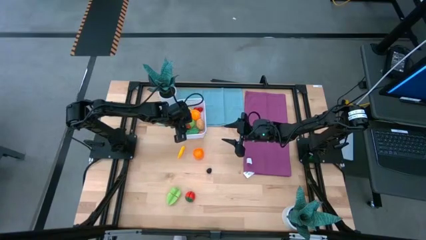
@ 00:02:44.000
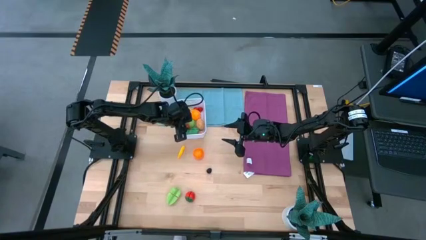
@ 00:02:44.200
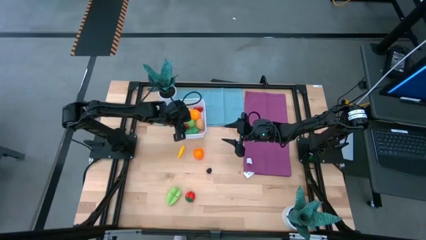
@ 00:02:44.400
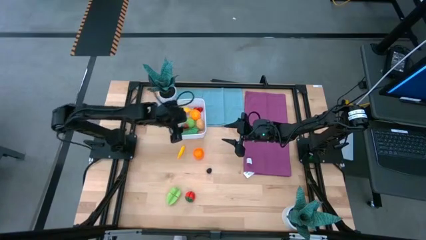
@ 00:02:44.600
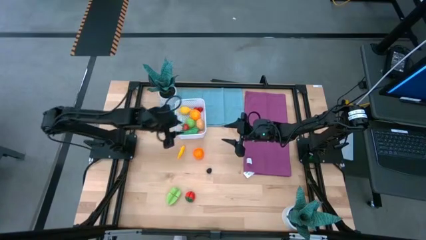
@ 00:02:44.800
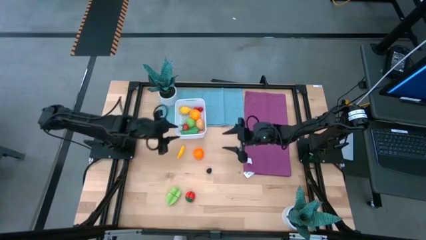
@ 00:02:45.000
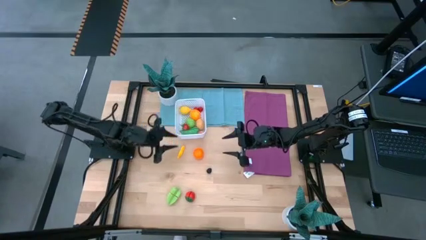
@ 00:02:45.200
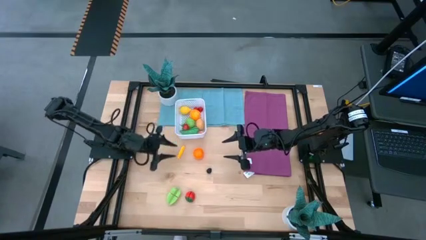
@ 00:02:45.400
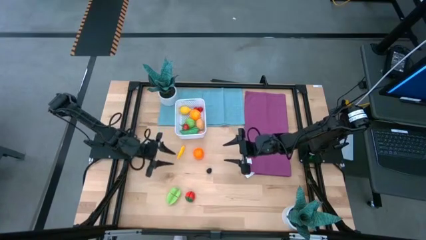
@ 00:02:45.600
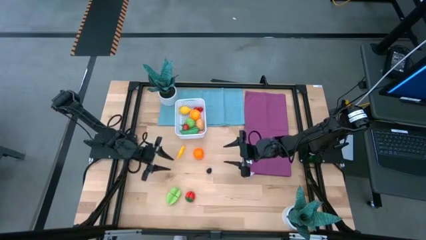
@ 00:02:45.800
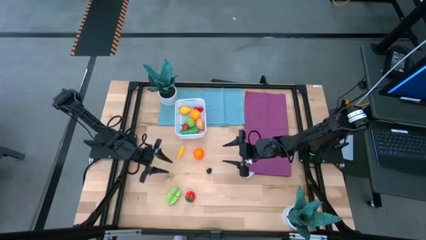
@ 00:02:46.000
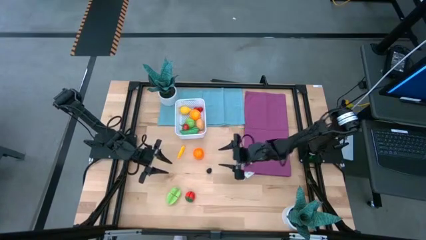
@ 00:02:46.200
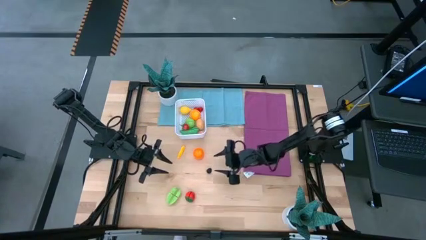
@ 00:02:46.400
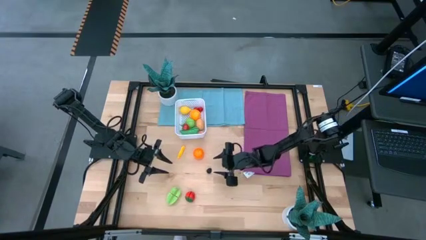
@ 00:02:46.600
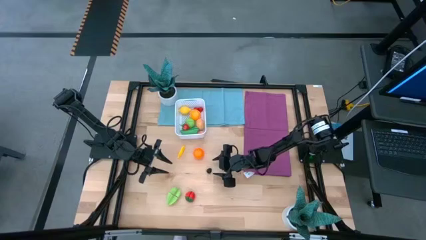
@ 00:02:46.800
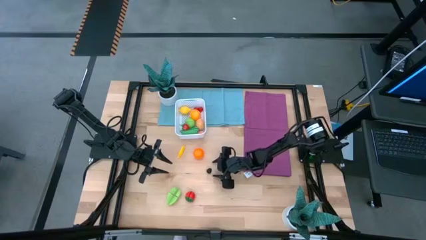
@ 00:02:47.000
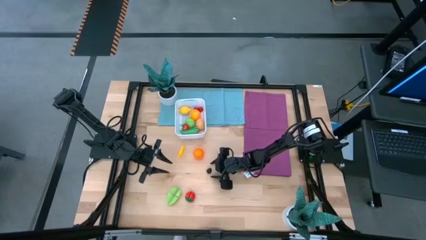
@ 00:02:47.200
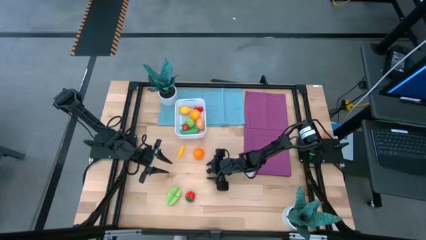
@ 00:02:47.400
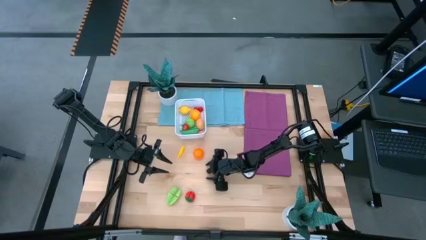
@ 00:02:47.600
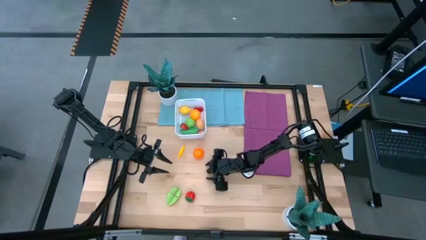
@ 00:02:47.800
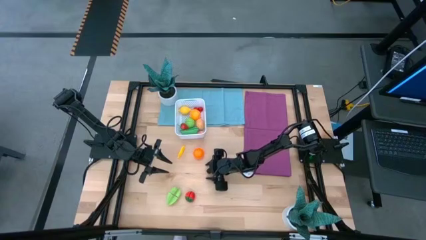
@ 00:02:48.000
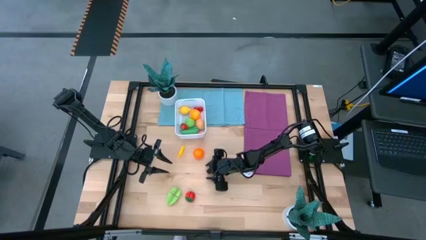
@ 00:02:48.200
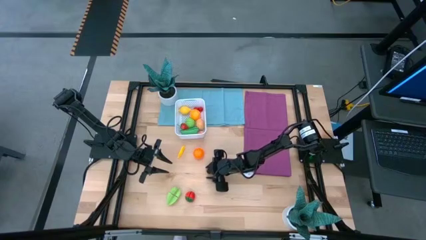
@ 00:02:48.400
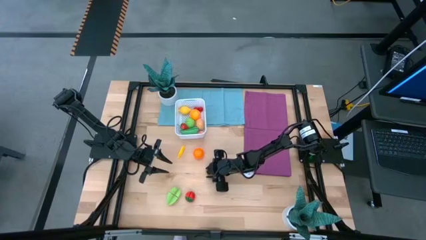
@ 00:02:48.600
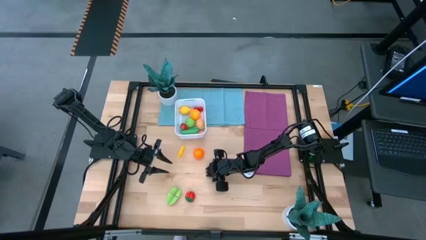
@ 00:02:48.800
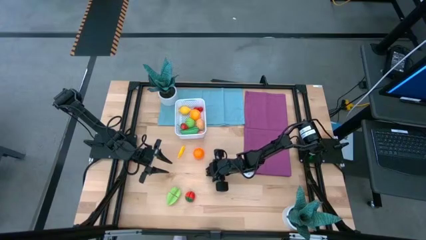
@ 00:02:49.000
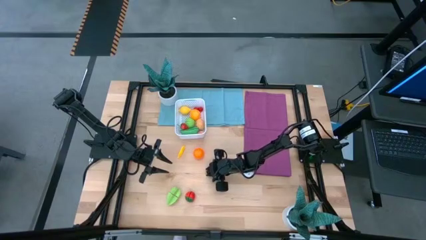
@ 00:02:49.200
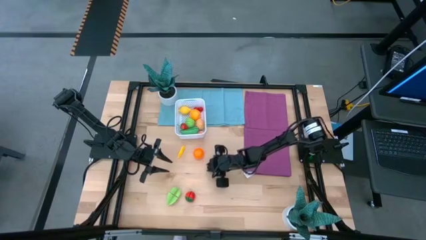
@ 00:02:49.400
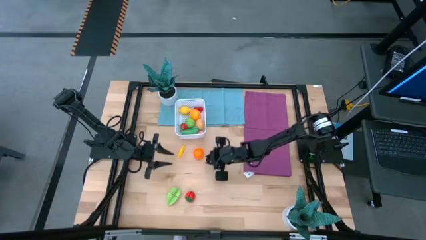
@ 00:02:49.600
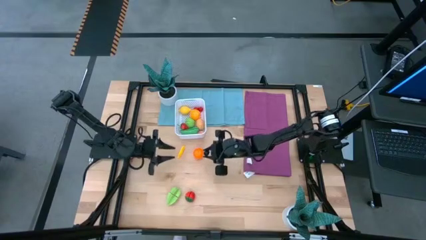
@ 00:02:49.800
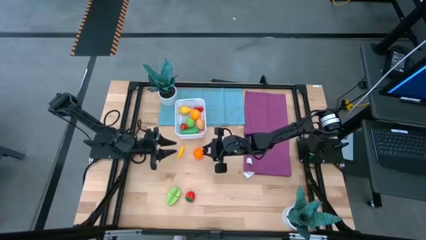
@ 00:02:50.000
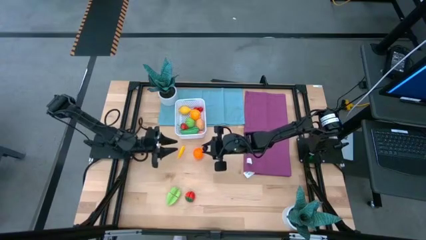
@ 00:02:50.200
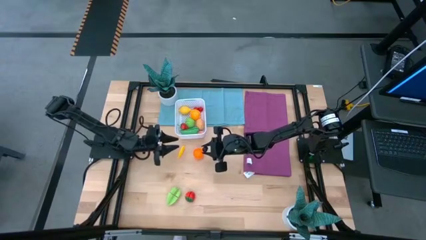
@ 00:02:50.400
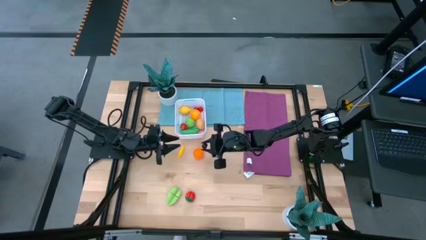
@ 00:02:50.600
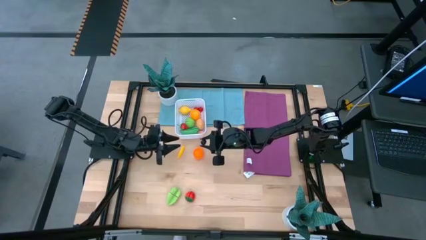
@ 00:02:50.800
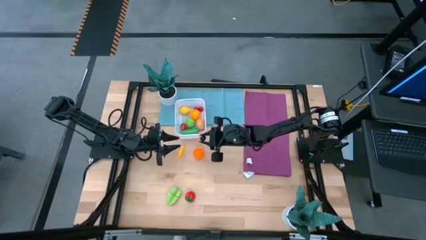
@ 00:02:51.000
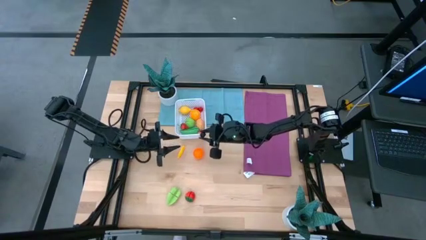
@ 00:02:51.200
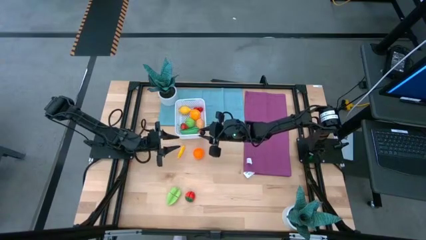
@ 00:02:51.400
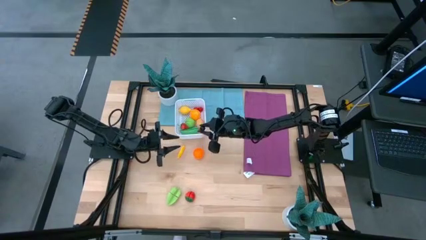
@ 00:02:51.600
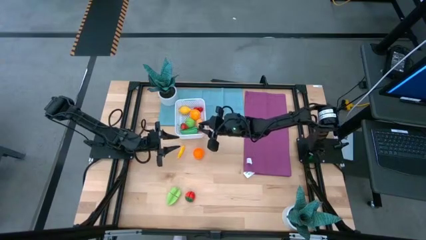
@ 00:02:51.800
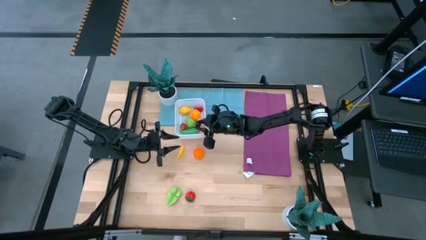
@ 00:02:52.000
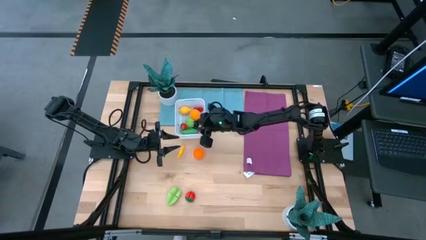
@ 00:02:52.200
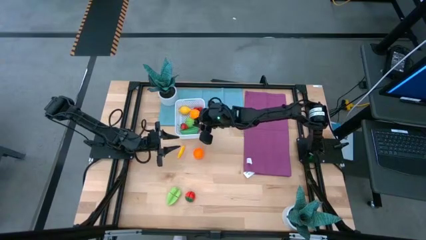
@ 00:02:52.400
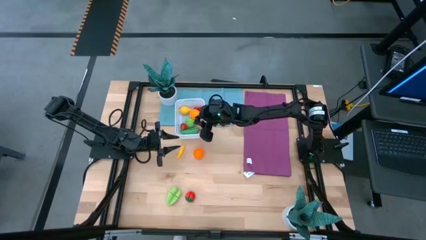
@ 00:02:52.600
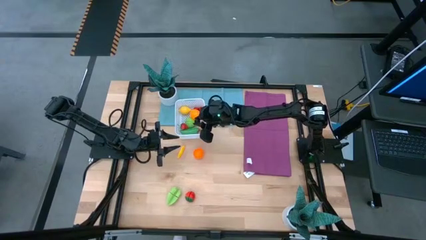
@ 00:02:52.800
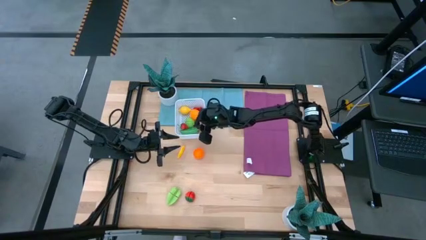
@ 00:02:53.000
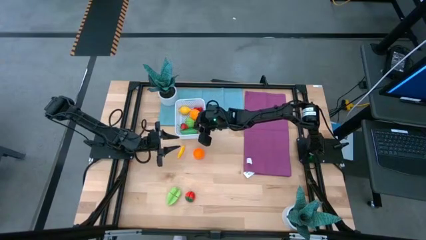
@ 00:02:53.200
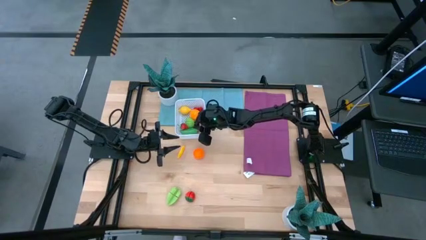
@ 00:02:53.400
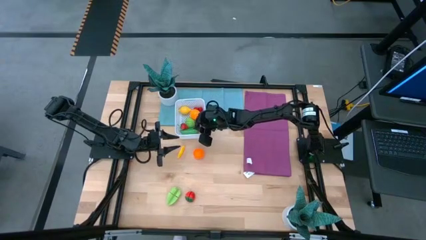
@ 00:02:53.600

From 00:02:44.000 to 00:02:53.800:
Task: Pick and placing Produce into tupperware
Put the blackberry into the white basket

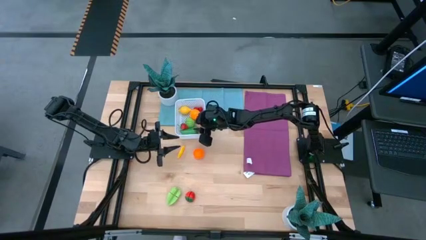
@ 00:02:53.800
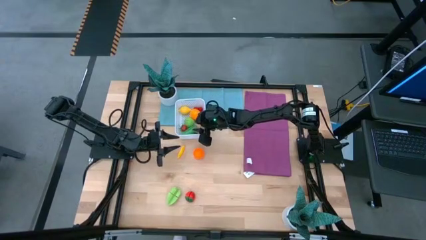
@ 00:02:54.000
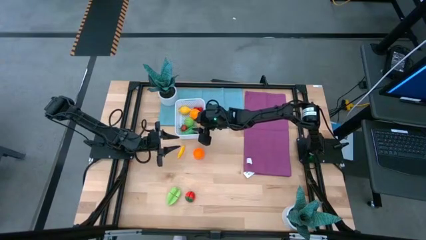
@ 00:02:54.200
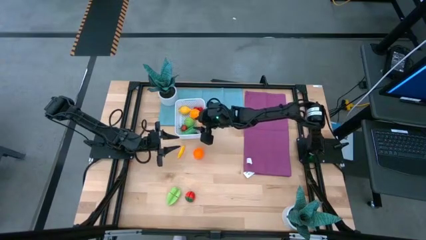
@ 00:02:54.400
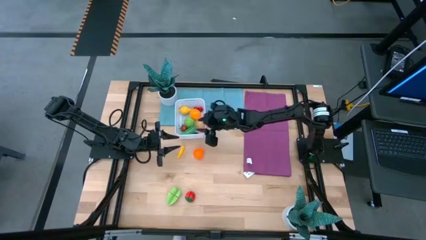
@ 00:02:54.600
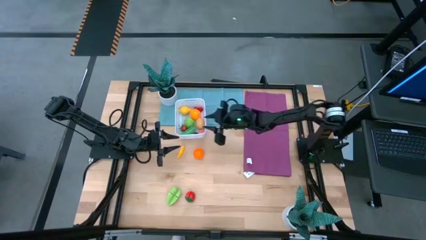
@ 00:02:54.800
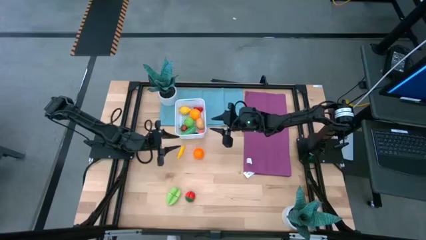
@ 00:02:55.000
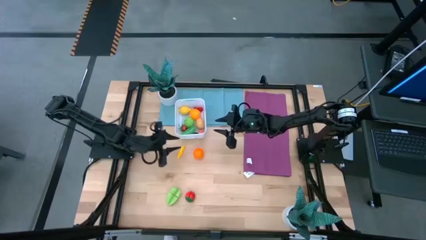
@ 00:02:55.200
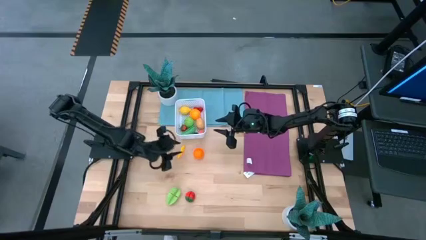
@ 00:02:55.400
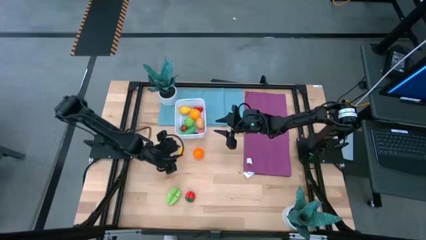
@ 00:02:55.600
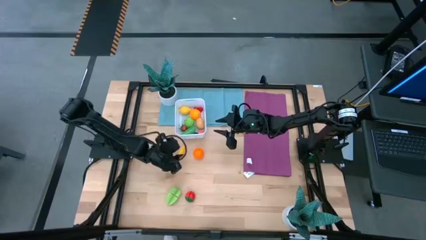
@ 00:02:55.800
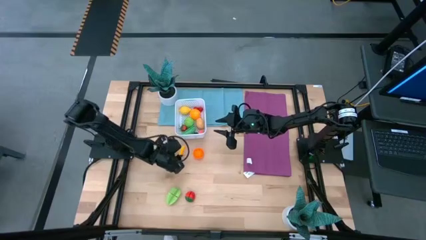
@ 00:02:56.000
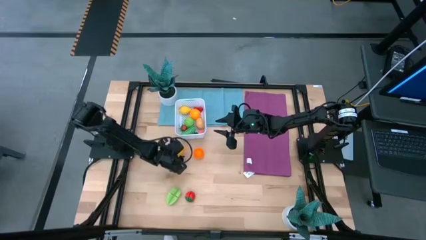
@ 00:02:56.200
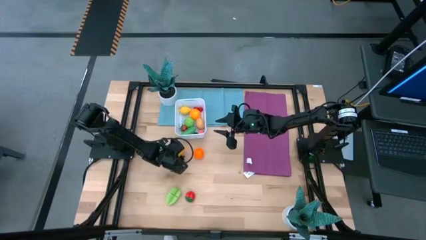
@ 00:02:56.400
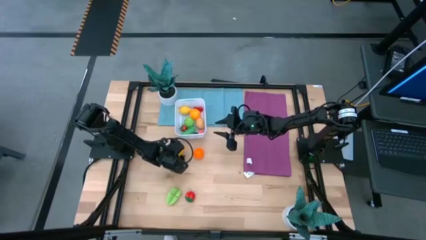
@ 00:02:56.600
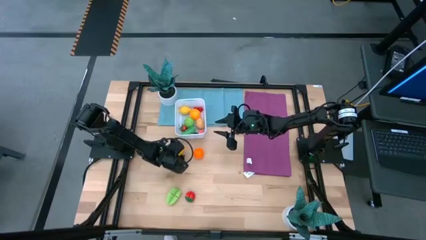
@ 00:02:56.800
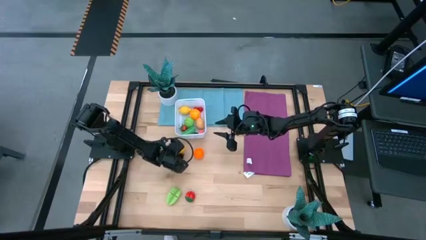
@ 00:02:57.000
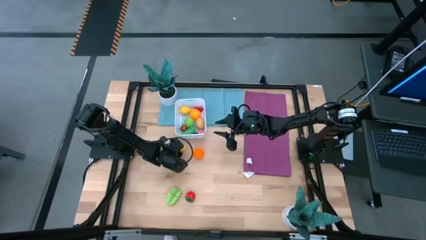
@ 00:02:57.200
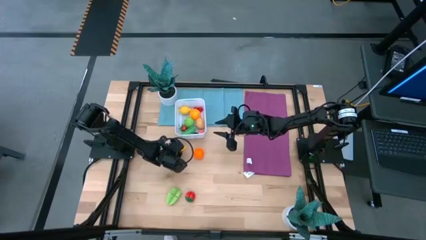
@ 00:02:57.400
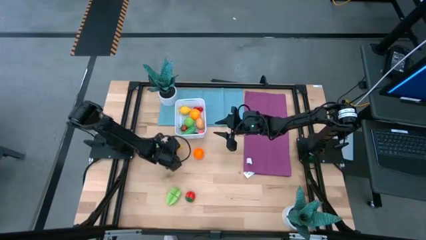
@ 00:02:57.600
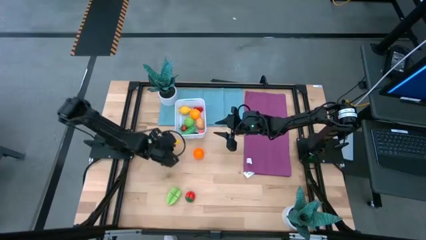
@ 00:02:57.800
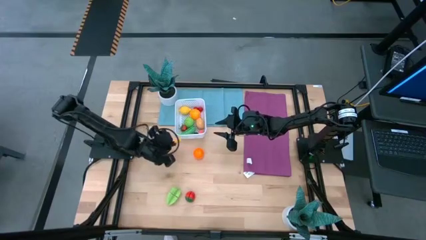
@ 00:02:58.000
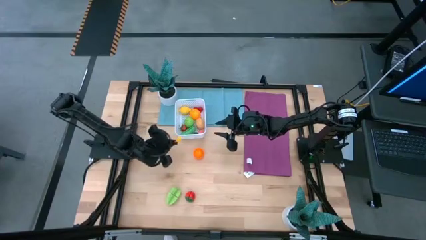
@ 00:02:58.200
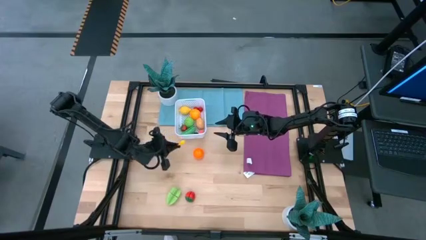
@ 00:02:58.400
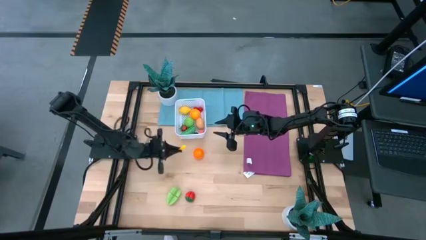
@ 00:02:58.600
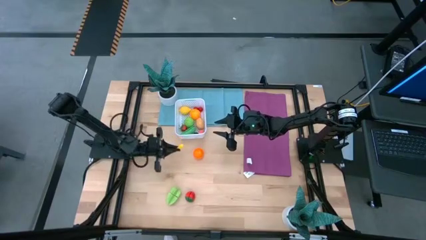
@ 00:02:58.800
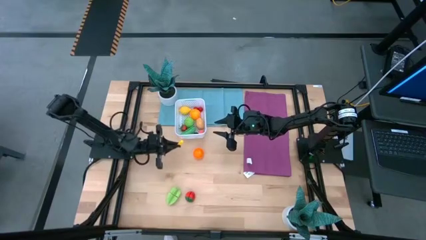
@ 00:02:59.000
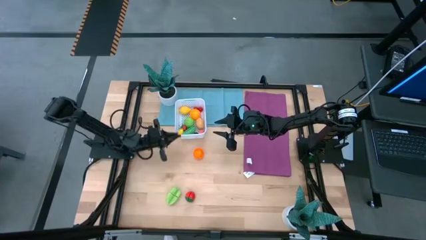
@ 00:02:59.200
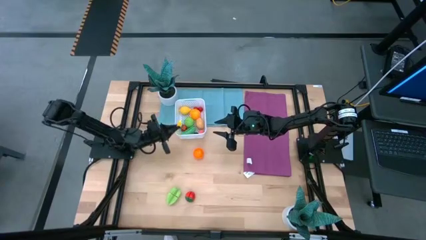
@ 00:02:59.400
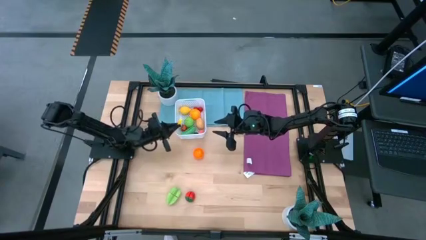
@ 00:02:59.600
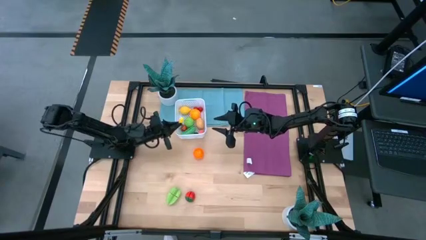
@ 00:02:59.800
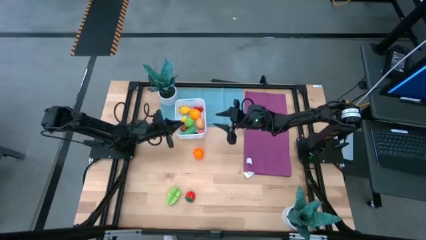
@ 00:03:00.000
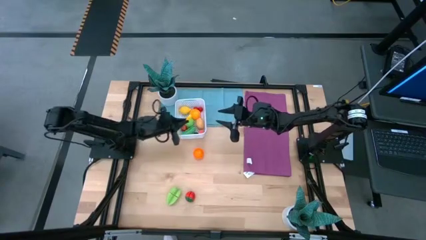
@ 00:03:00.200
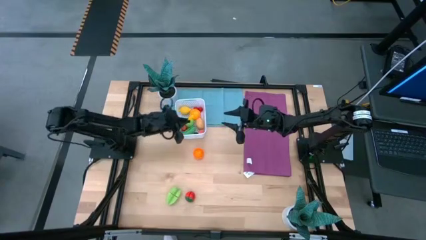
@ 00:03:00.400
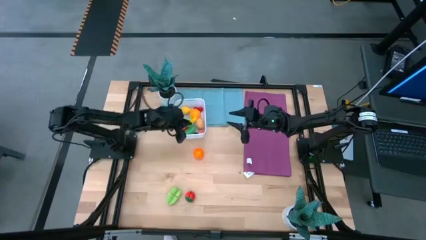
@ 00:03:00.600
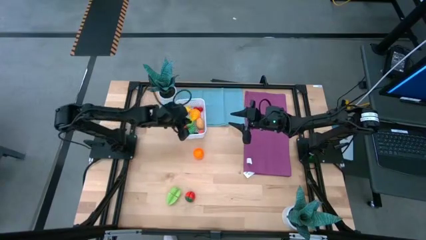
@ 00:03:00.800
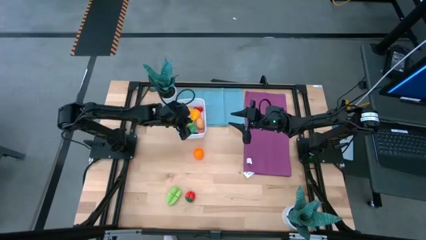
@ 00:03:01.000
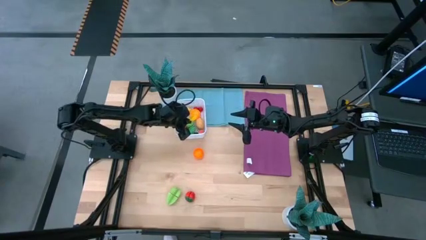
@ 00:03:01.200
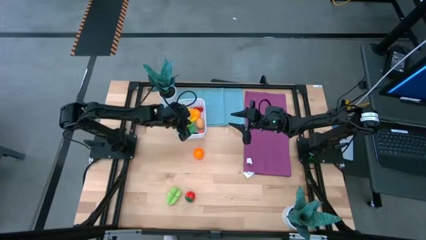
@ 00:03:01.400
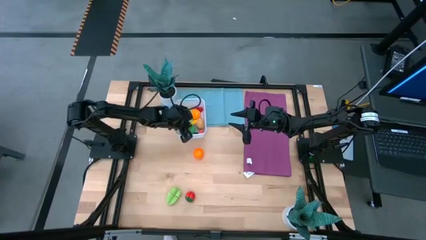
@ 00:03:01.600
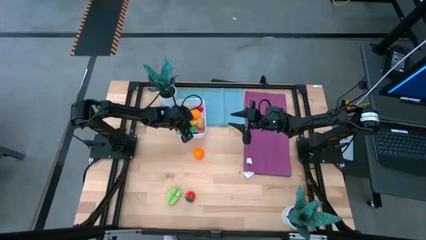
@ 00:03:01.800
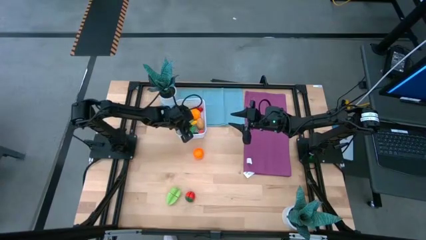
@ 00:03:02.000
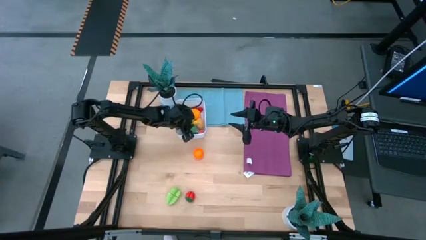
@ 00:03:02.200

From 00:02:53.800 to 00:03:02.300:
Put the yellow corn into the white basket
